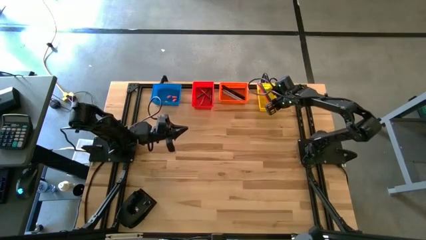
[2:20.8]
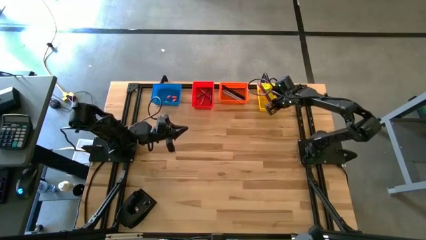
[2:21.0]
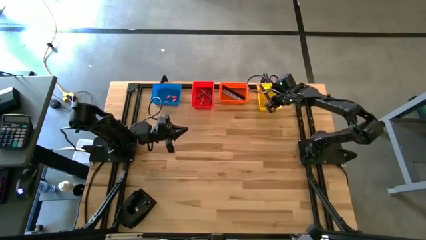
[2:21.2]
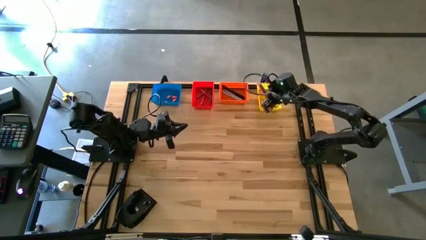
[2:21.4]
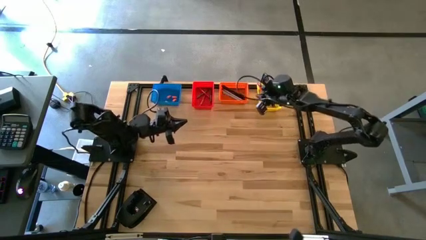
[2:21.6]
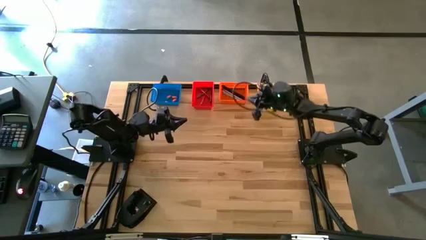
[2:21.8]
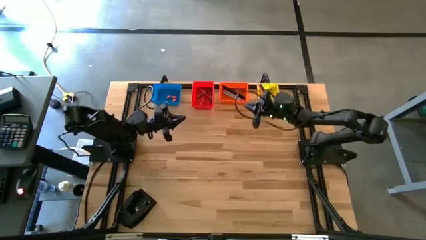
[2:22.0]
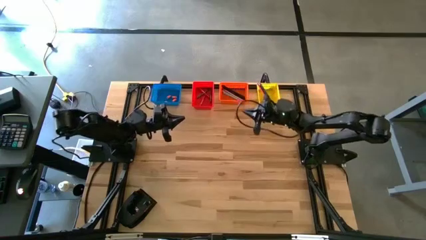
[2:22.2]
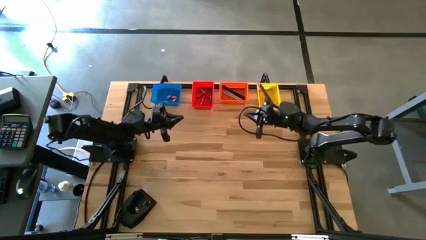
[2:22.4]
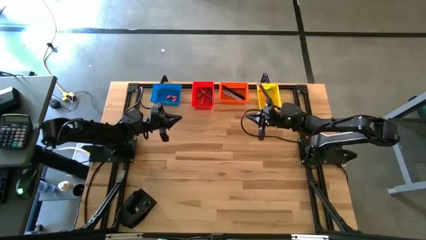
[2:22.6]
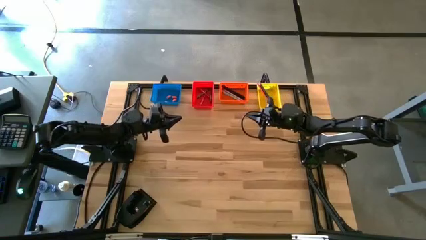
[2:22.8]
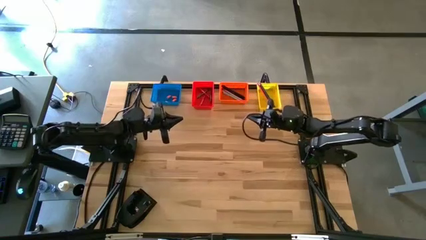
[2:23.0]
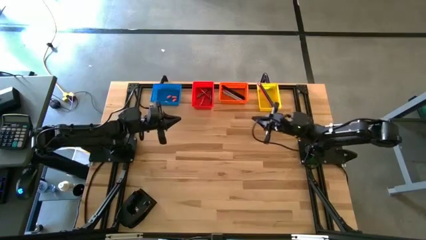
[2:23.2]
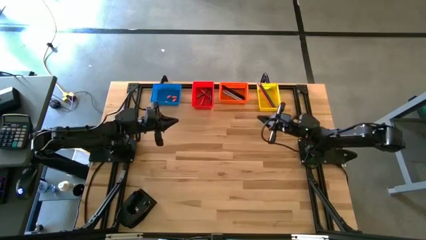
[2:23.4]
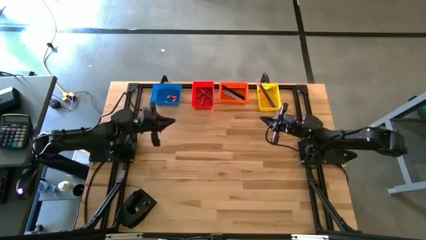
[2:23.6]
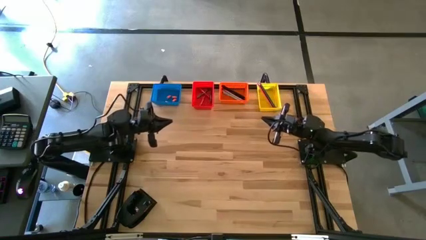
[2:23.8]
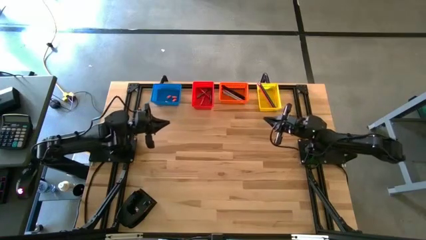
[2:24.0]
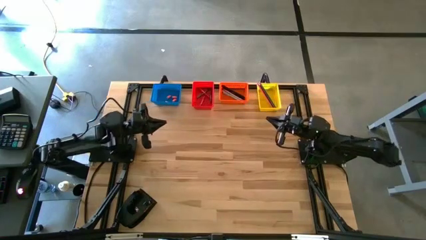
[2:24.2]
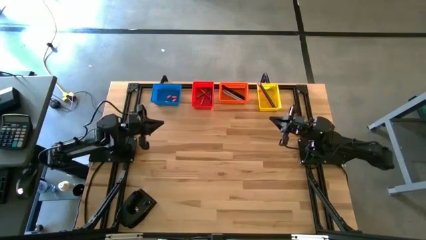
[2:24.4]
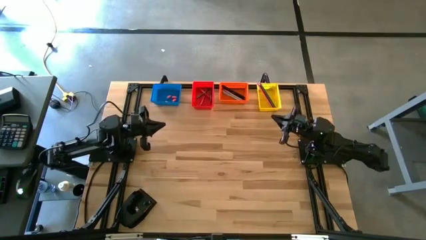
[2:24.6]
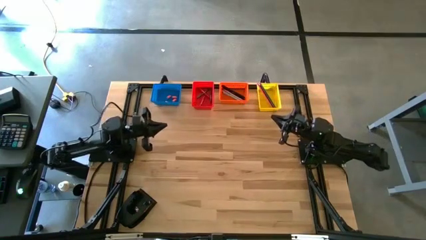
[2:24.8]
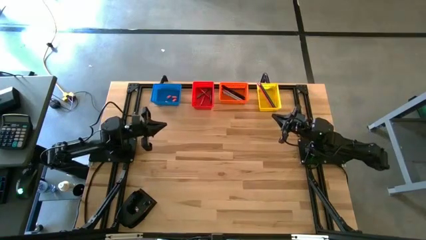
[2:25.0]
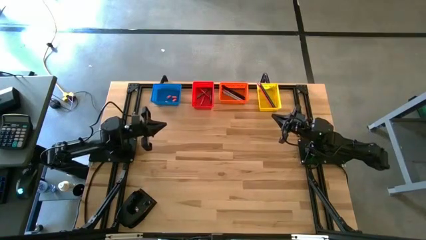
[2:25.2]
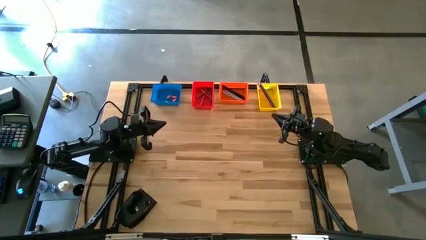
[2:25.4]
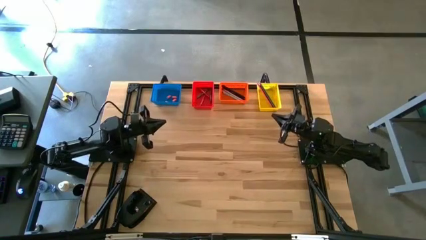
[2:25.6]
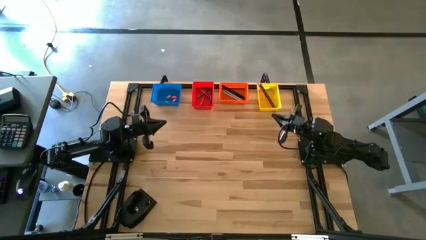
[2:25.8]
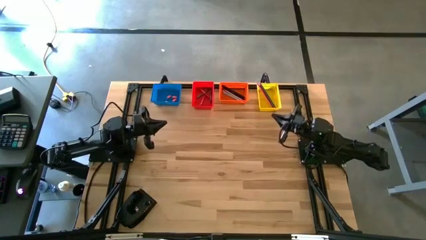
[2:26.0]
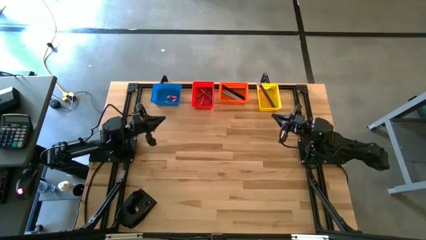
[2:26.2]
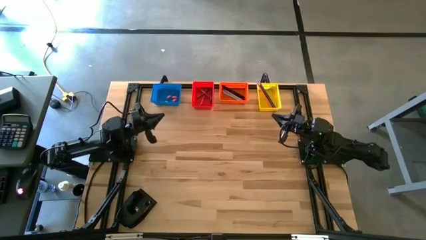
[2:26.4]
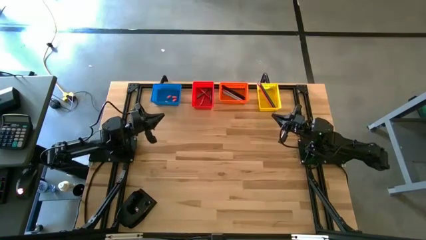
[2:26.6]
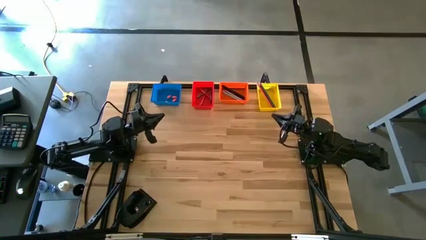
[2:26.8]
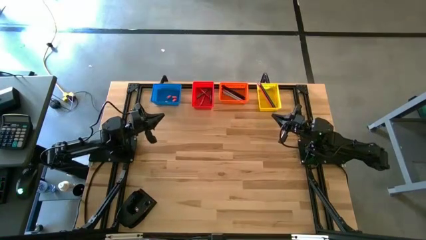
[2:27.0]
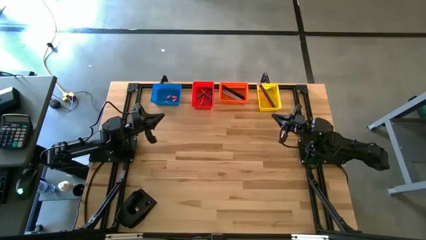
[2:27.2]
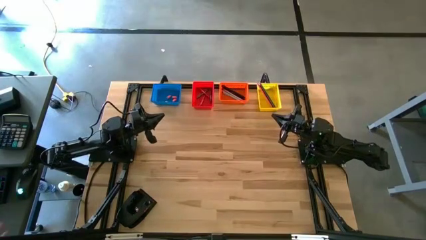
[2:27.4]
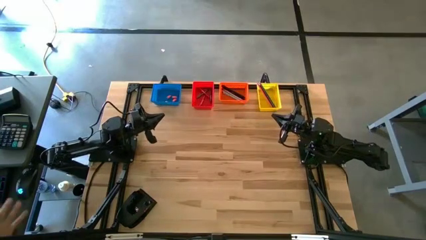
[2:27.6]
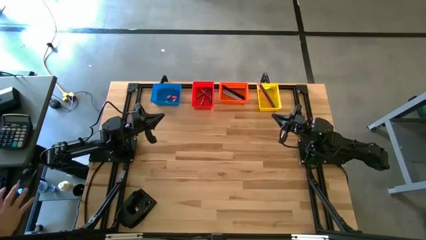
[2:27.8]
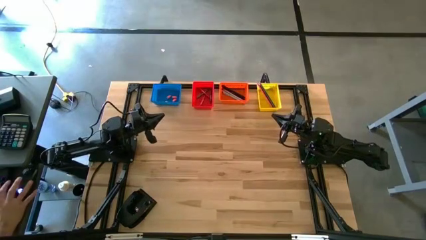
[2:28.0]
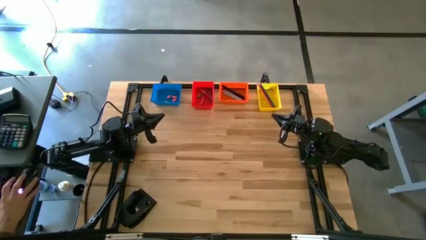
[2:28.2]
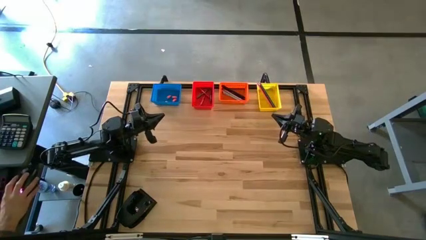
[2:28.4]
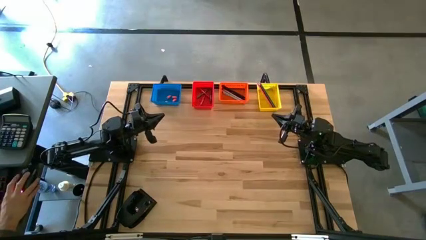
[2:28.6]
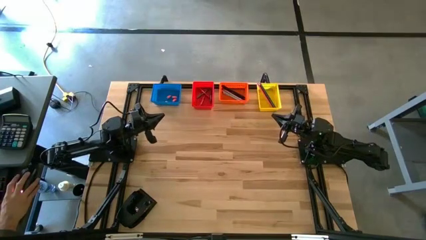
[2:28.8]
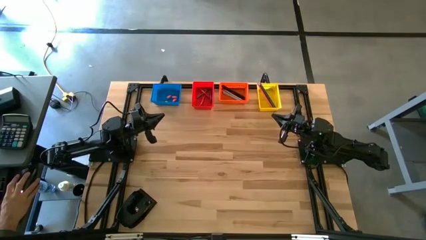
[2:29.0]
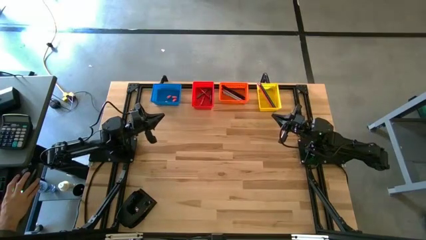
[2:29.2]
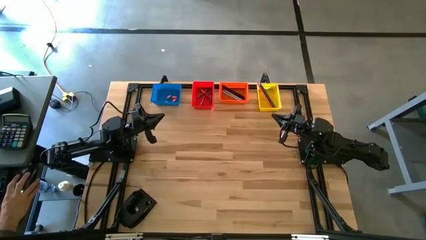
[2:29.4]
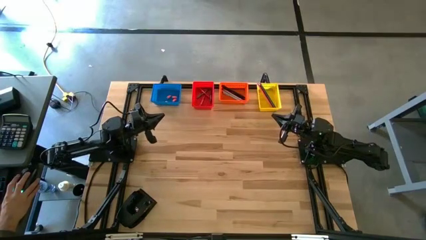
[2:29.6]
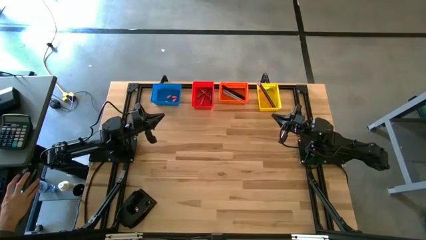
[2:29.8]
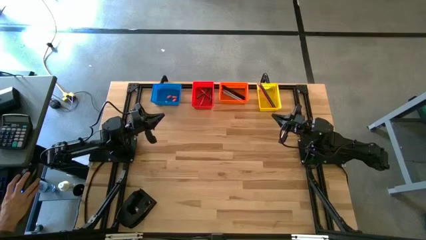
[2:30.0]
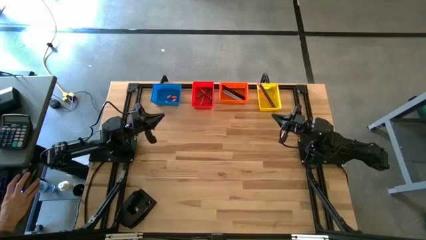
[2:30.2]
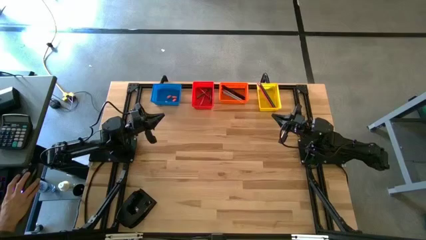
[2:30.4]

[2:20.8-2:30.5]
Task: Sort crayons/erasers/pens/pencils in bins
Return to Home Position

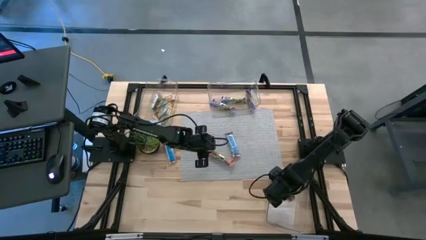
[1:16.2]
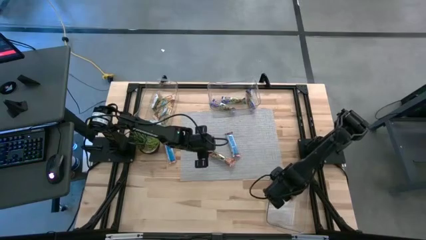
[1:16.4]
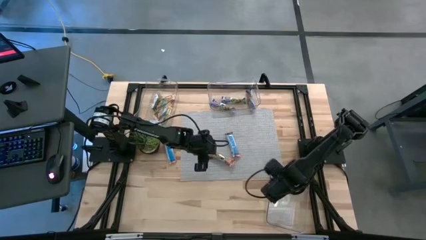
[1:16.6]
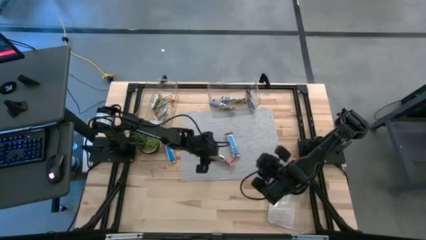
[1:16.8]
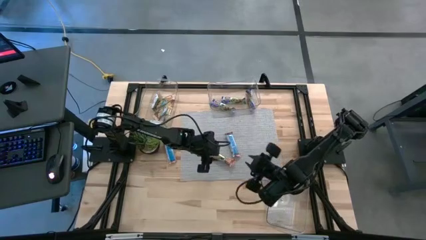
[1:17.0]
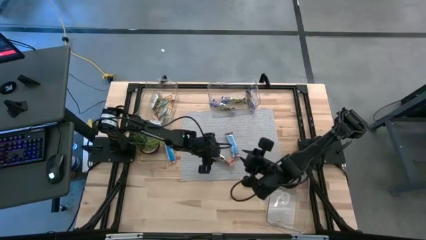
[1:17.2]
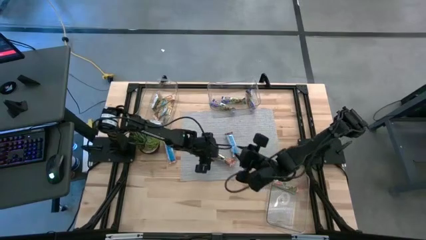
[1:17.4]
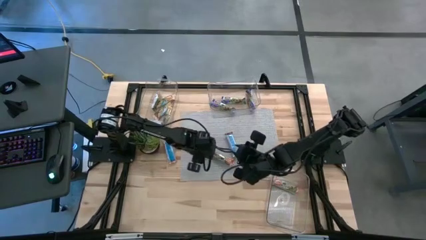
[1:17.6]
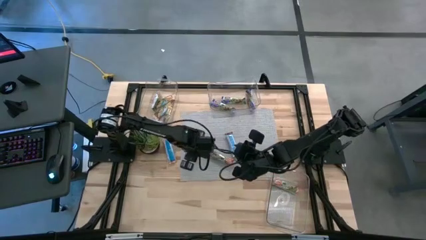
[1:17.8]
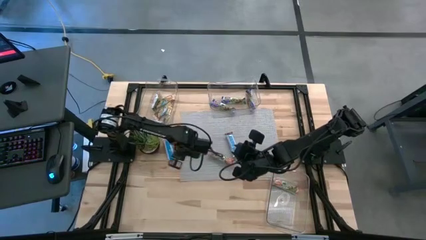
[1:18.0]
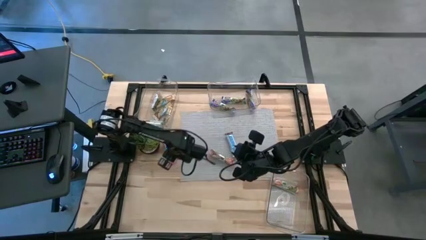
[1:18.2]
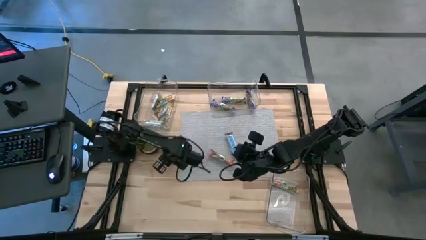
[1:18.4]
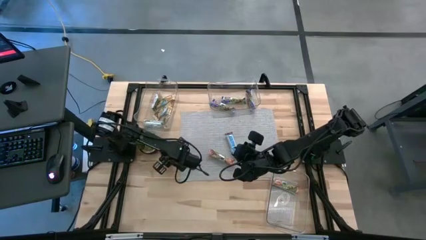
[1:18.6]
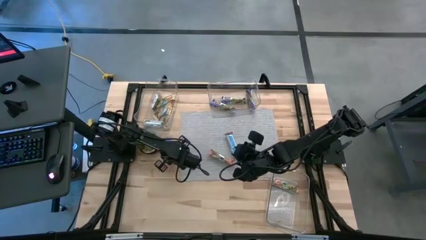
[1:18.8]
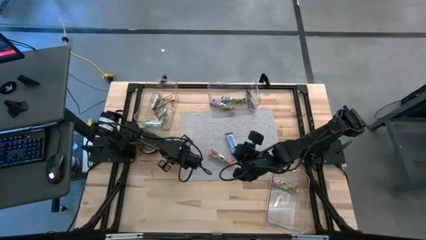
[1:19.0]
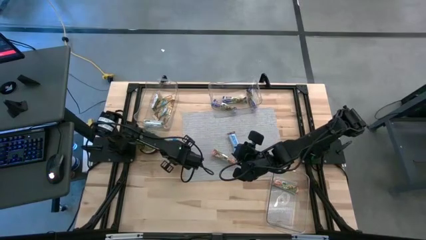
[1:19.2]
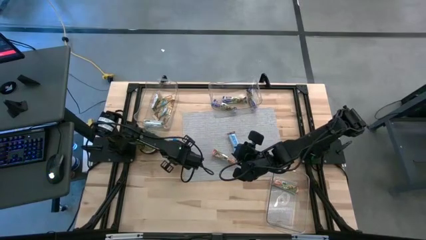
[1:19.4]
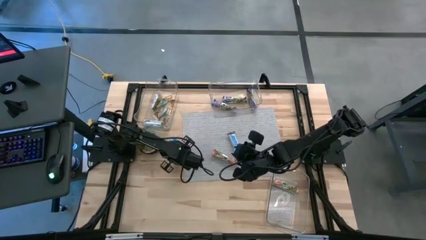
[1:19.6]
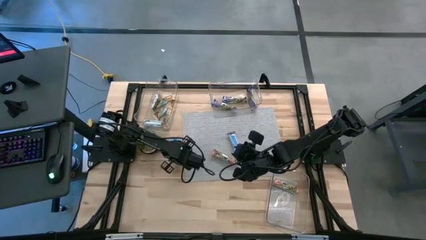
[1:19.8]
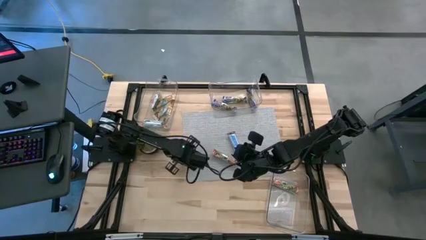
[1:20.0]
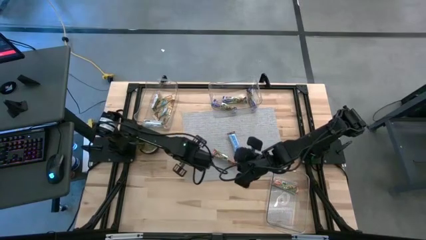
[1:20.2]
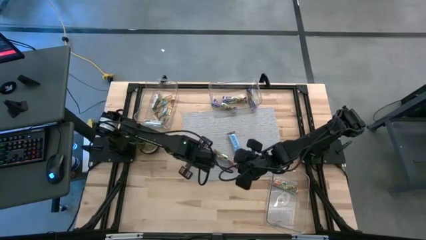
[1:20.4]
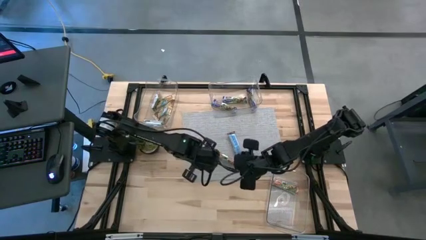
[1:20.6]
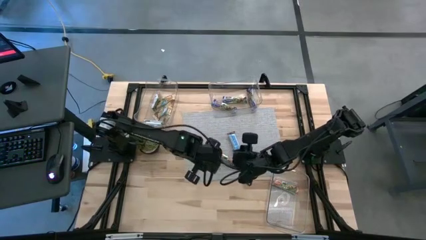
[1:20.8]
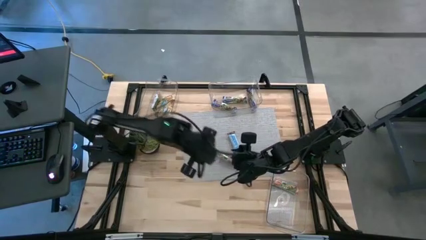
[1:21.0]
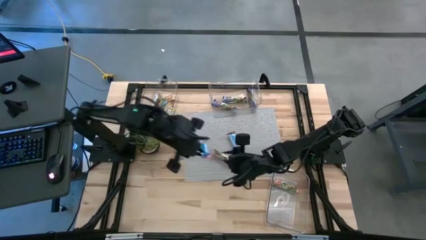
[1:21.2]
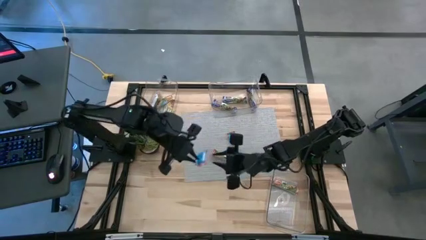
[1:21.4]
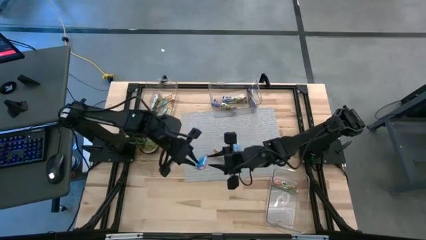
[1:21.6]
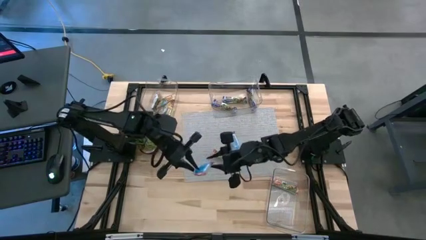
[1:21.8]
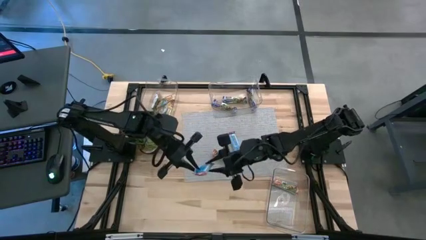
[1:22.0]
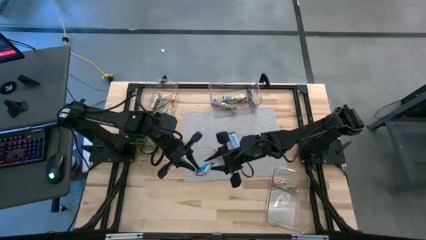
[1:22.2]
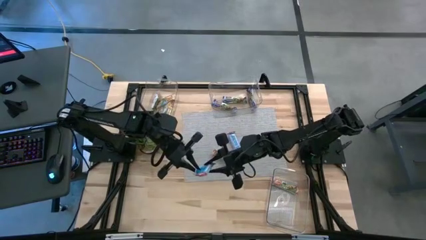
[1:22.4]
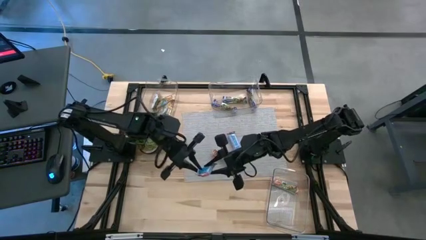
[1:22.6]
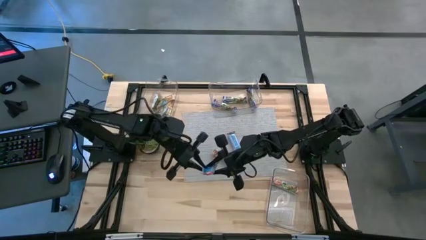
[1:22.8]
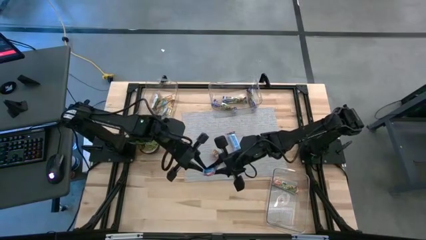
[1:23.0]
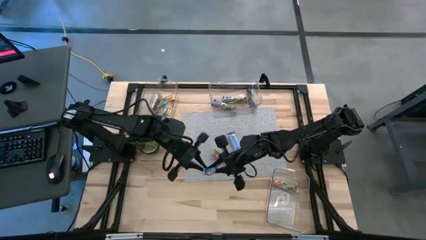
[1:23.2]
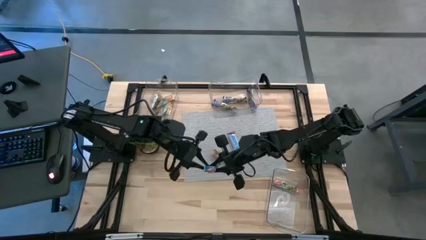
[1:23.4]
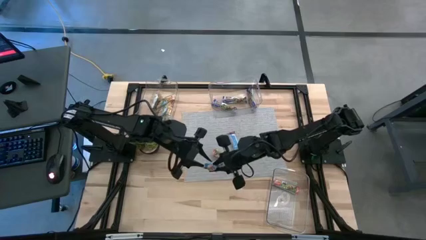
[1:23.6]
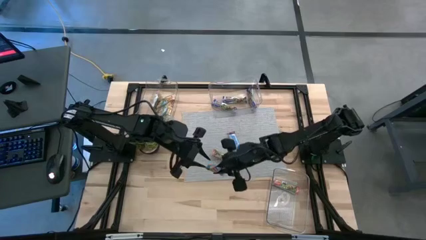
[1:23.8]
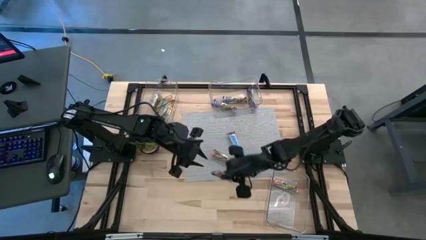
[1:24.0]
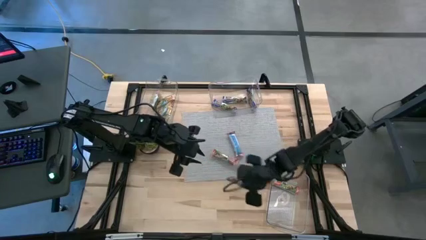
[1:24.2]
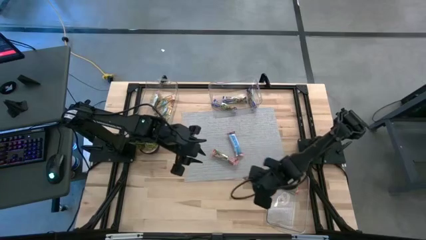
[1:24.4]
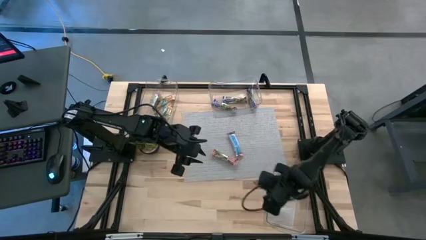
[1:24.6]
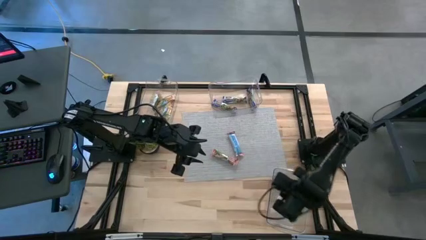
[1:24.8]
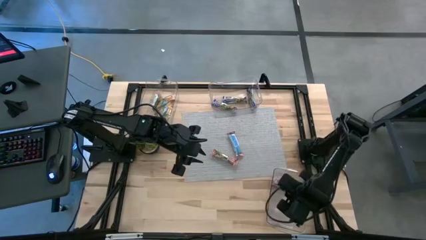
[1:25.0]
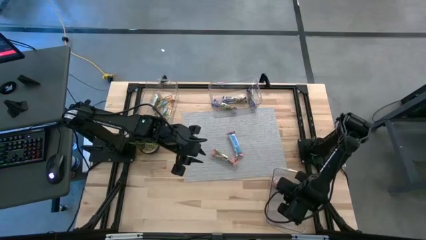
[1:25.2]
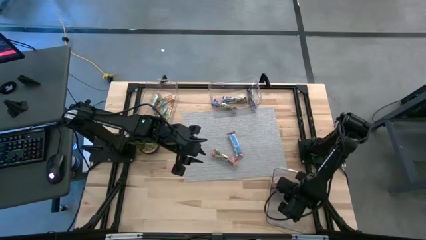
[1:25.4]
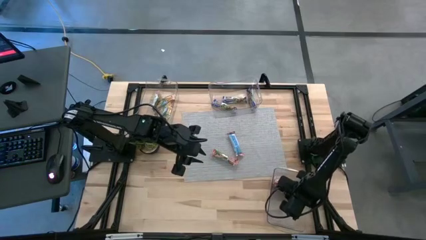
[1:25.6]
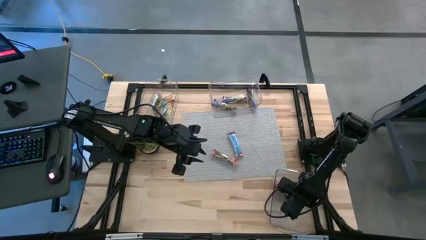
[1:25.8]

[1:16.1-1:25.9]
Task: Pick and place Granola Bars by type
Put the red granola bar into the bottom transparent bin
